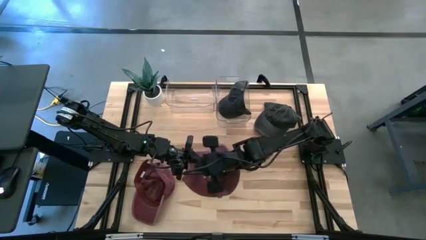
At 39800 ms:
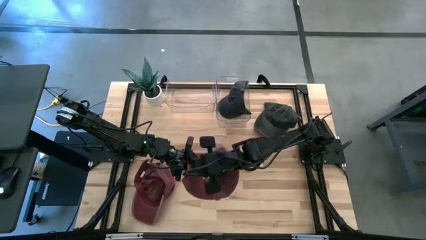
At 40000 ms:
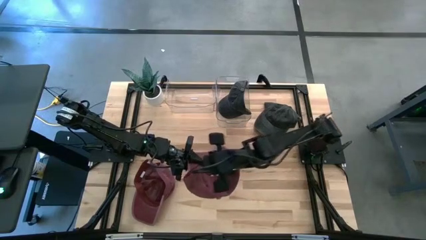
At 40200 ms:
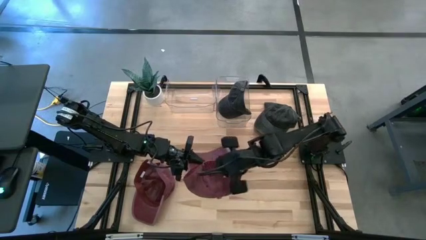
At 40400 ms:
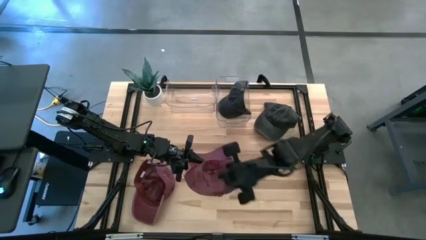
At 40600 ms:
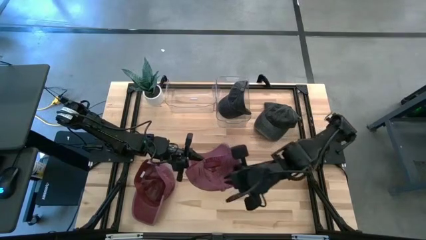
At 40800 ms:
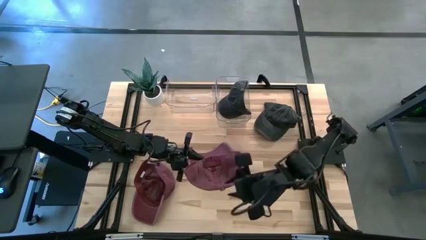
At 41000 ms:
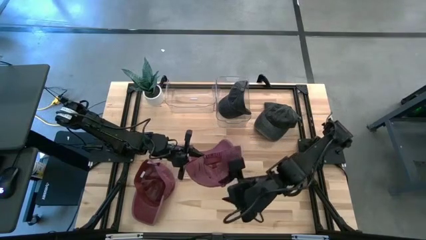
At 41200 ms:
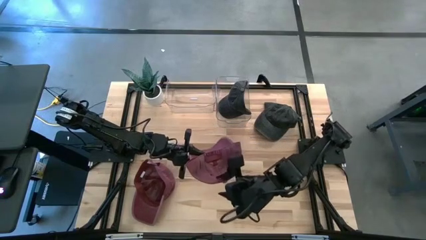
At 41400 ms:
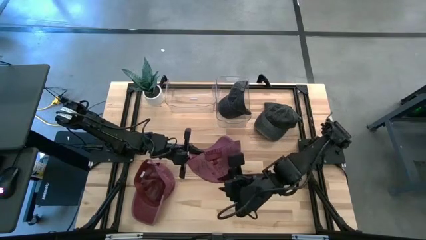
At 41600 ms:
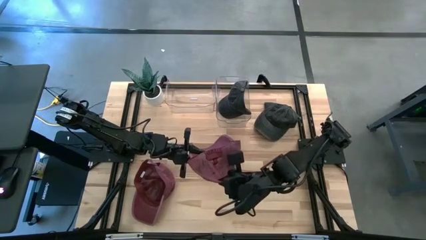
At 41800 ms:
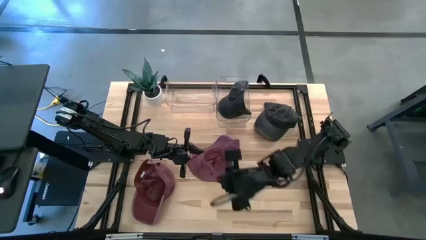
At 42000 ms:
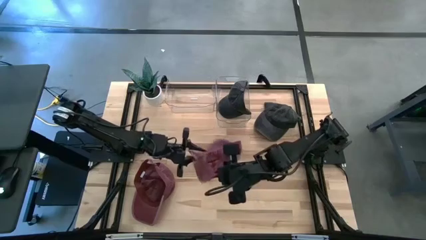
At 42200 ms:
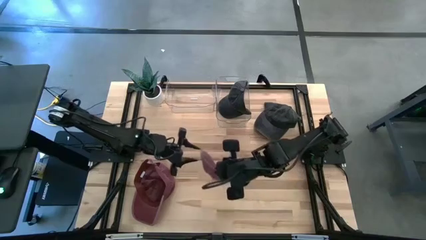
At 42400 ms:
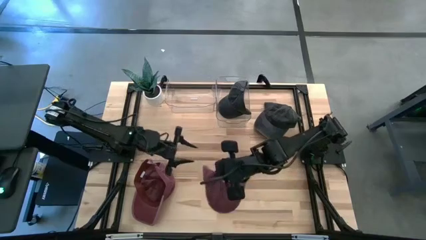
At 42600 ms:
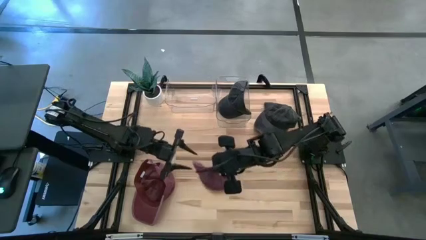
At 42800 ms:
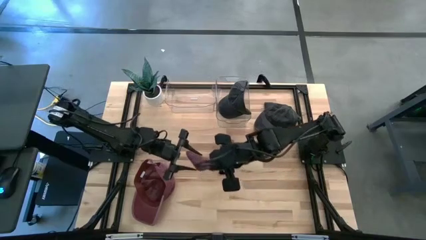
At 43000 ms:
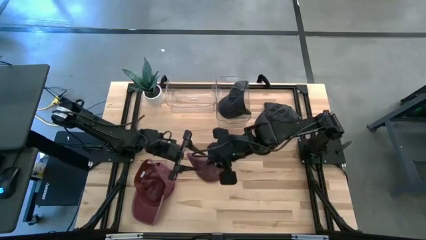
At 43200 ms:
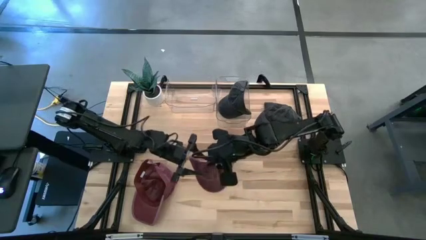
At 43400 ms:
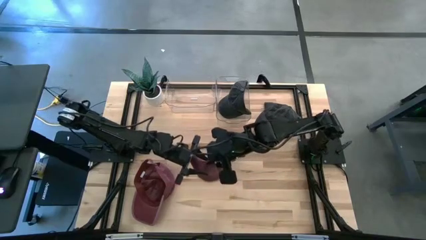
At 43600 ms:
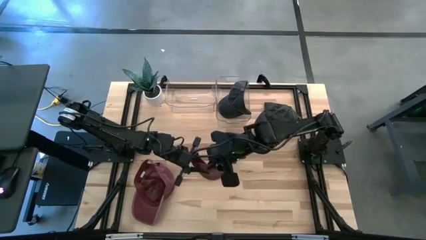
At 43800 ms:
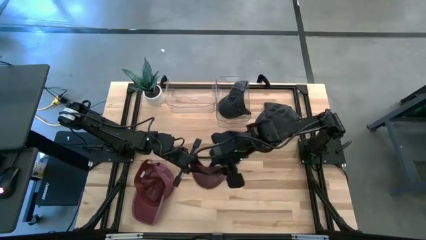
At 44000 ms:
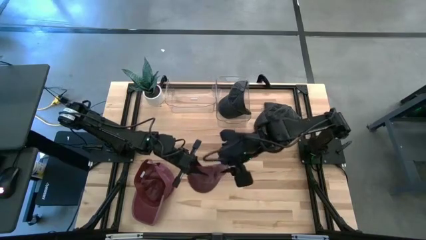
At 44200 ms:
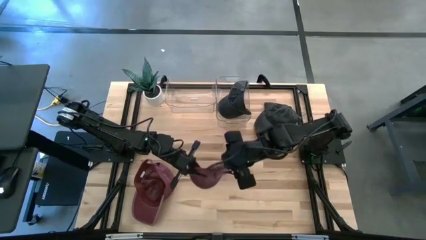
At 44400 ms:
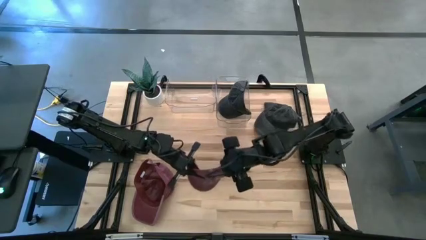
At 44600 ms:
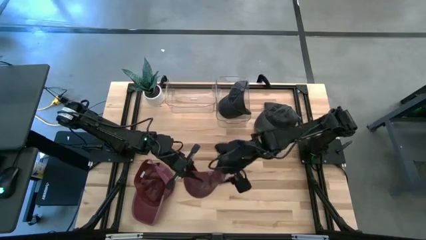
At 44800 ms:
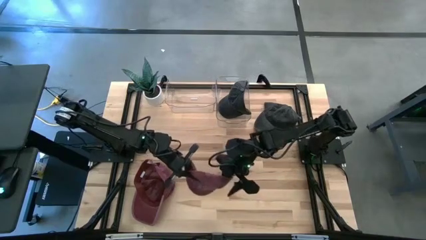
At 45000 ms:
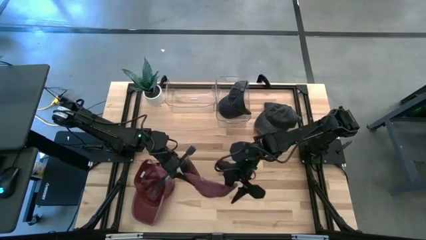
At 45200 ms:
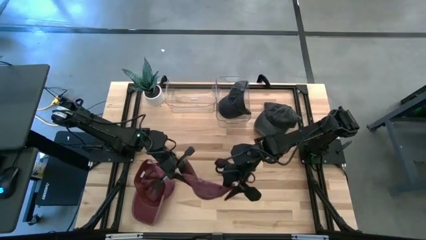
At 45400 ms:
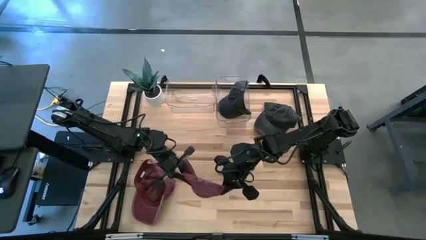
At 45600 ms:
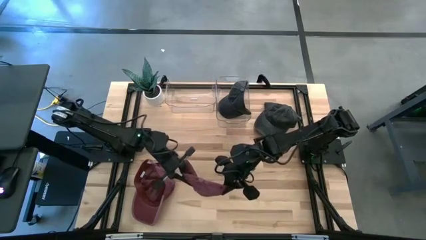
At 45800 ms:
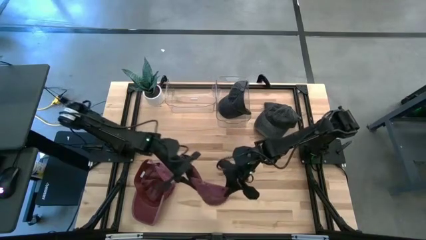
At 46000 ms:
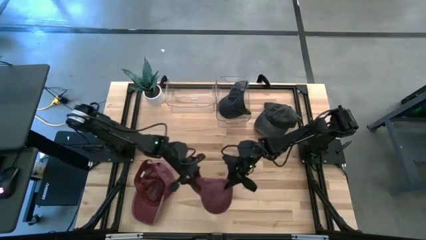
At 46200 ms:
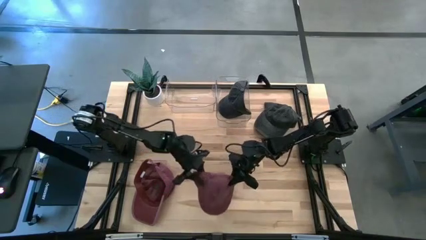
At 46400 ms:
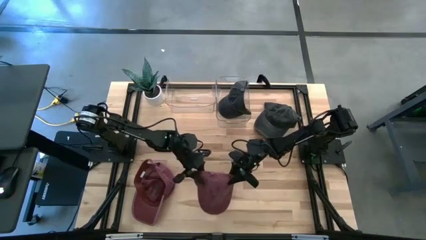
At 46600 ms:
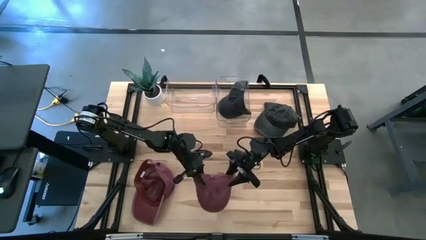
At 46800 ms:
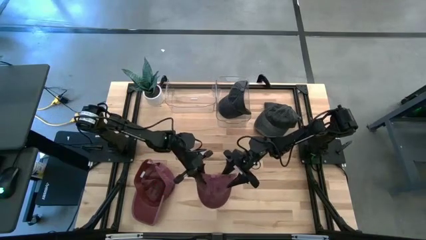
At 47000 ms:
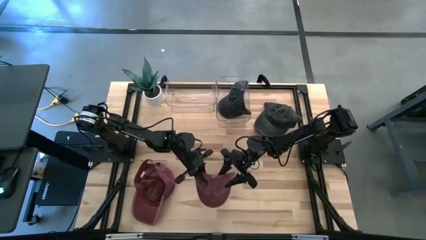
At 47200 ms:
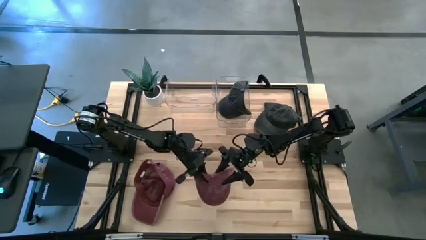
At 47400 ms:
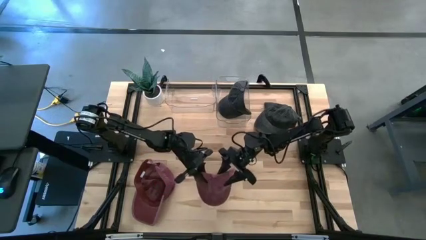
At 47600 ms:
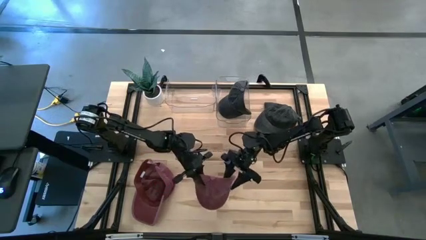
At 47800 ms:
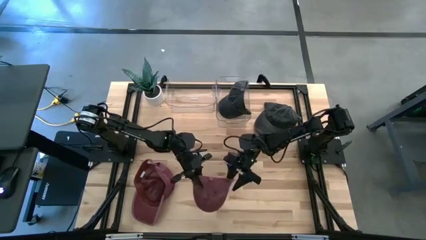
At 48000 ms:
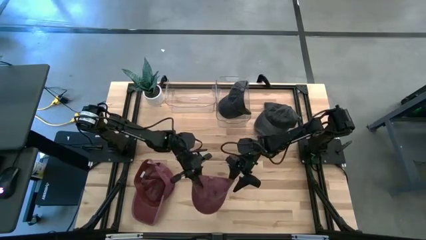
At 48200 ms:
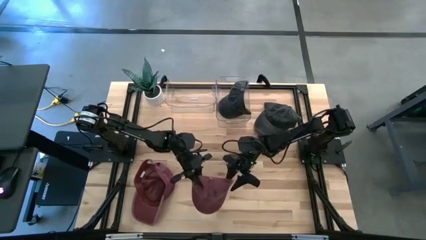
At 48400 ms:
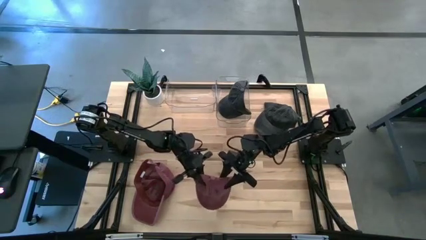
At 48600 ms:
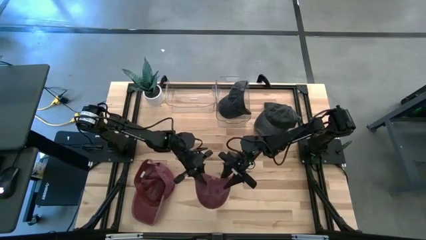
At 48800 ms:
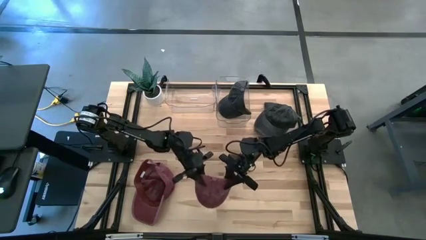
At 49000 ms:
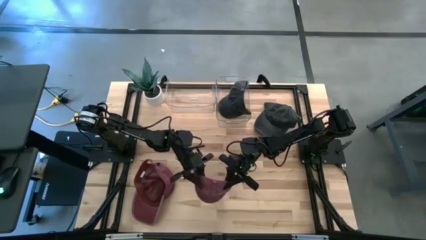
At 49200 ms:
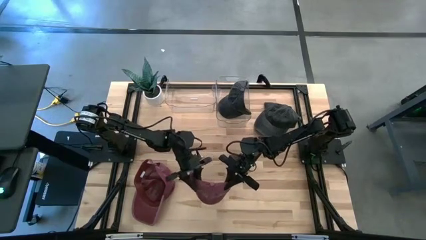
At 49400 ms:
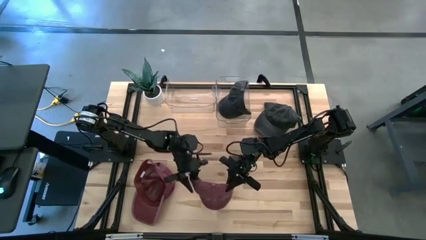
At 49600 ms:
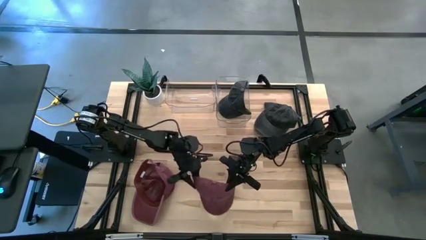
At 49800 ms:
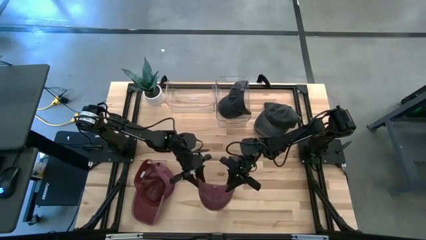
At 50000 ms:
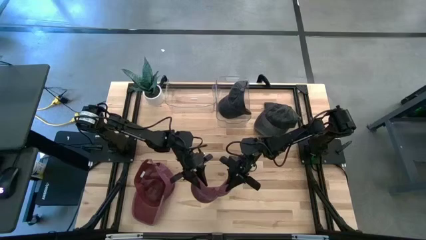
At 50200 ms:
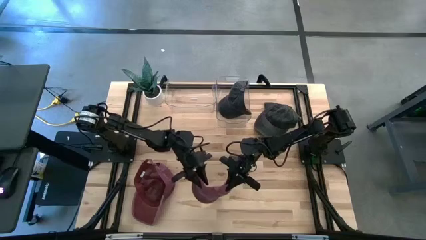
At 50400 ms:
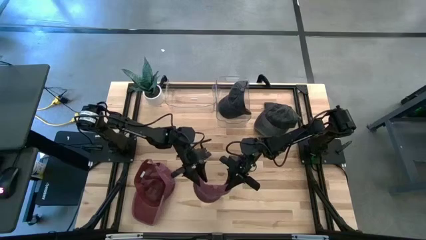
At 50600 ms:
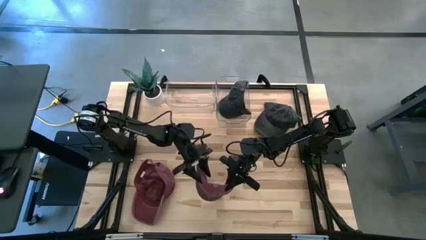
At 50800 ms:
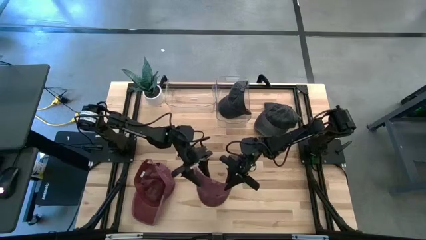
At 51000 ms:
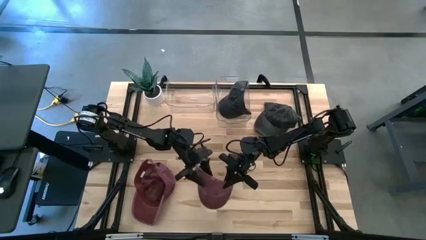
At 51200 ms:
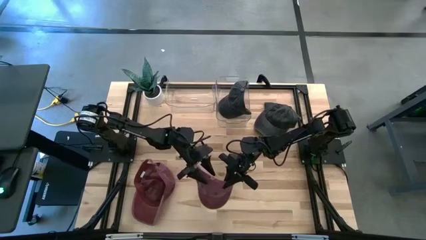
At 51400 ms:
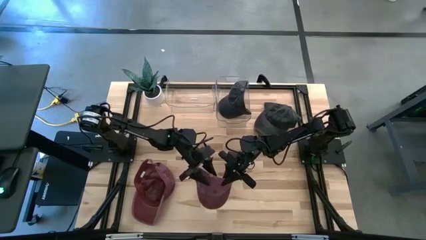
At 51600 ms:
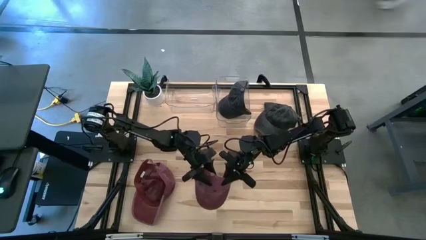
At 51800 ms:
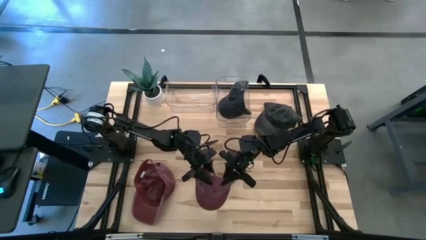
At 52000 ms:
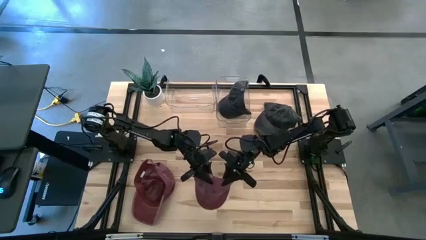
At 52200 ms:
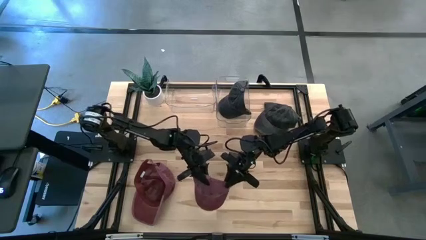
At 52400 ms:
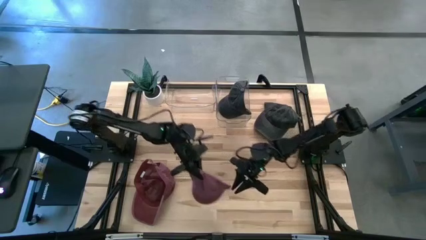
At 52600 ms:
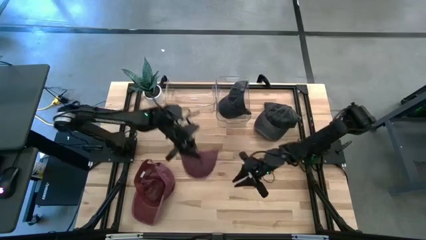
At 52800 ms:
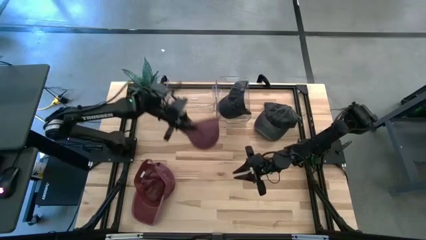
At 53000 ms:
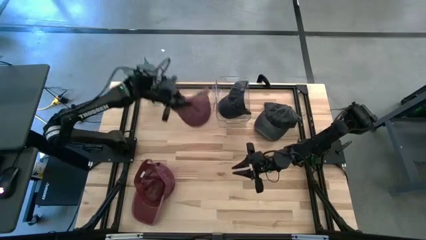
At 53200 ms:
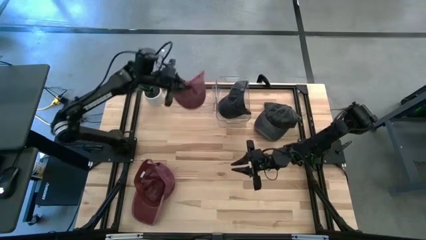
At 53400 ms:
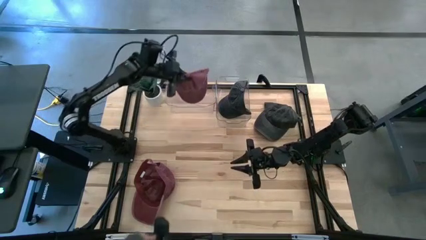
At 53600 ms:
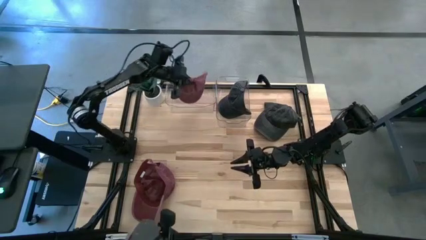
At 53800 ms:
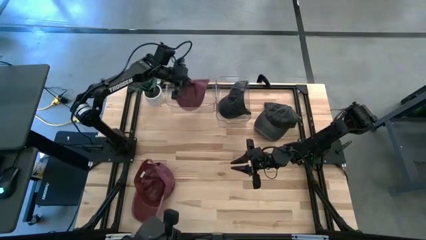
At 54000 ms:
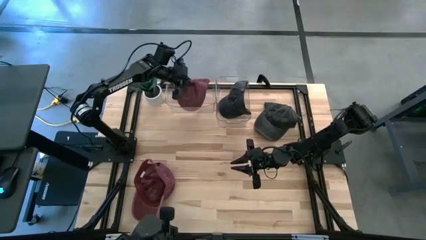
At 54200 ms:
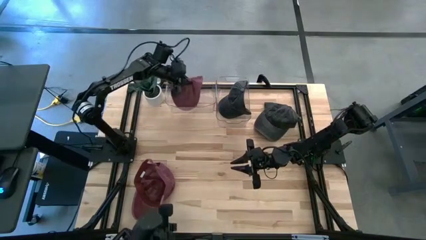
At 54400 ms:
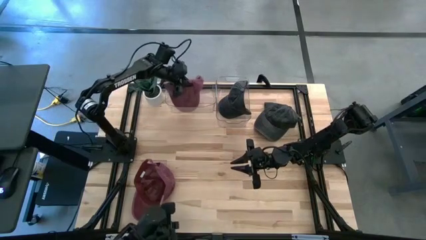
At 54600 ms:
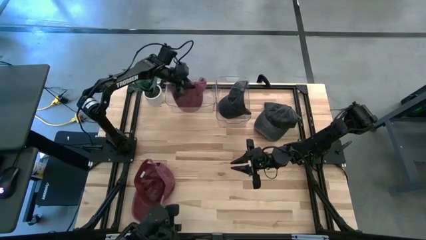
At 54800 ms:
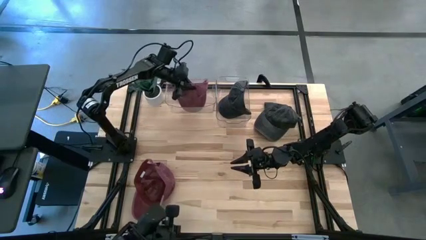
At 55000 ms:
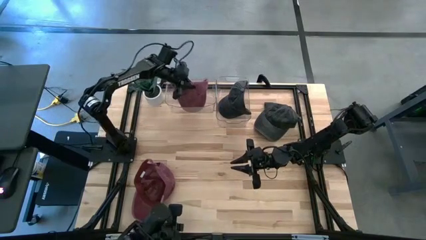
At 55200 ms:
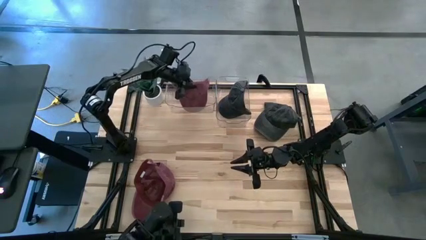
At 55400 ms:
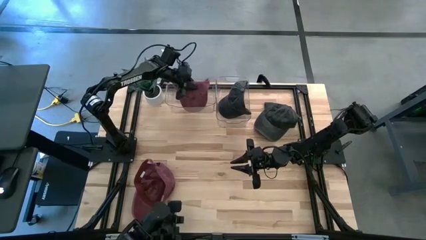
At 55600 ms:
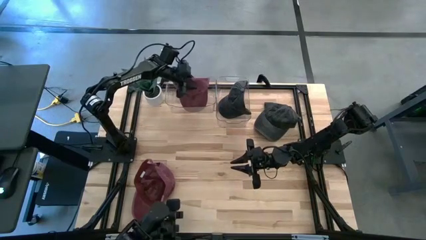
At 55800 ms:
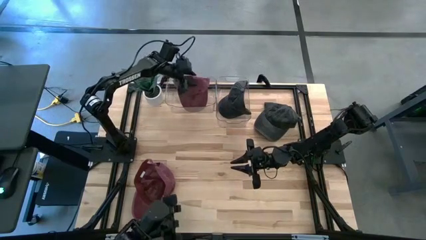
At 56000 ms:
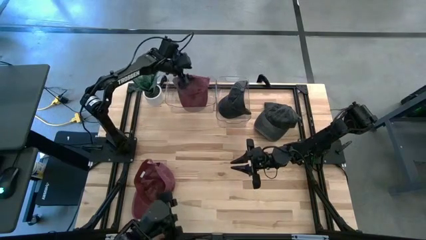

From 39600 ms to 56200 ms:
Task: Pick & Place hat
Put the right red cap into the left transparent bin
